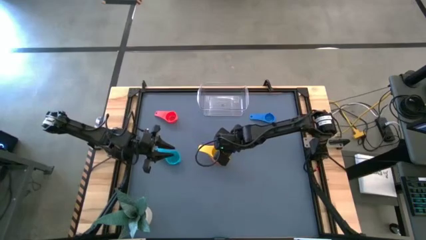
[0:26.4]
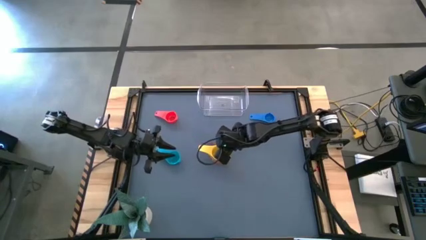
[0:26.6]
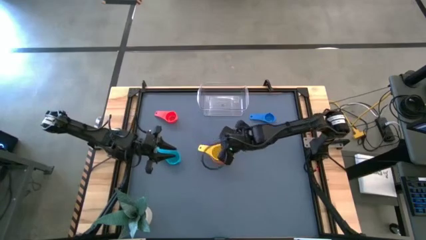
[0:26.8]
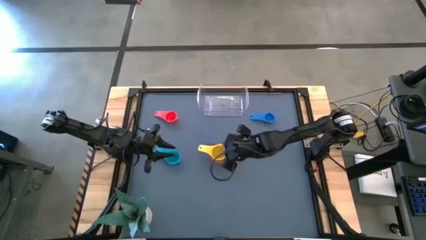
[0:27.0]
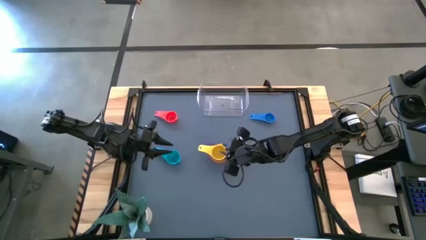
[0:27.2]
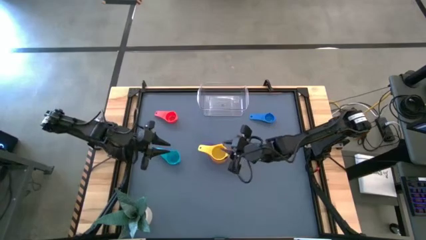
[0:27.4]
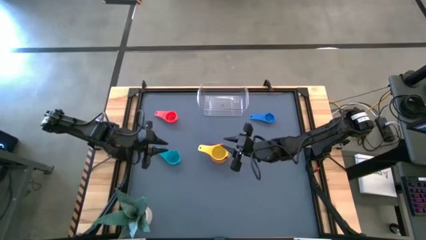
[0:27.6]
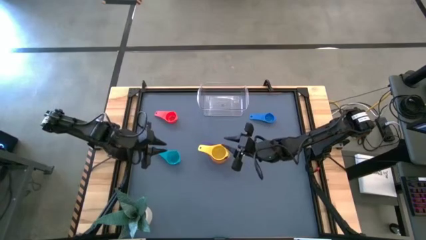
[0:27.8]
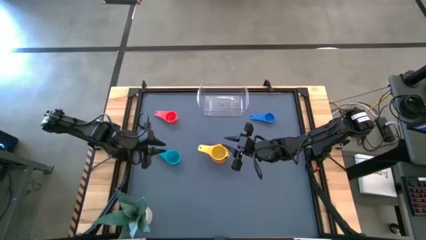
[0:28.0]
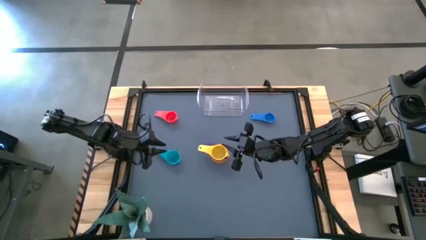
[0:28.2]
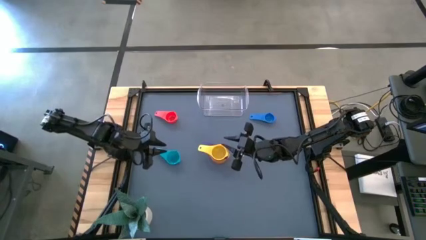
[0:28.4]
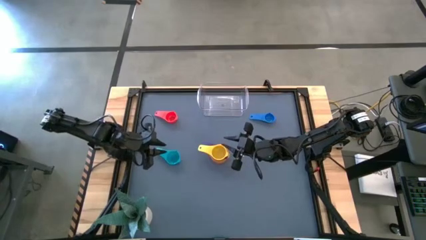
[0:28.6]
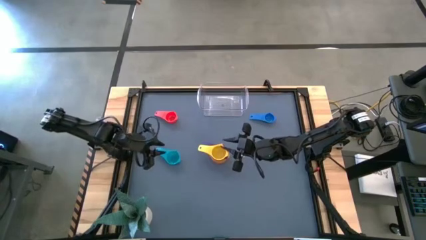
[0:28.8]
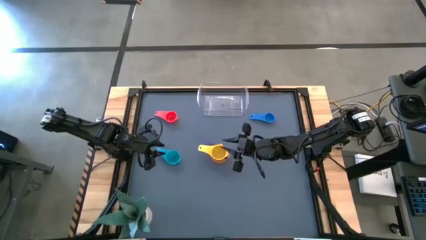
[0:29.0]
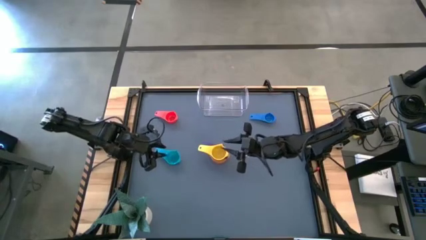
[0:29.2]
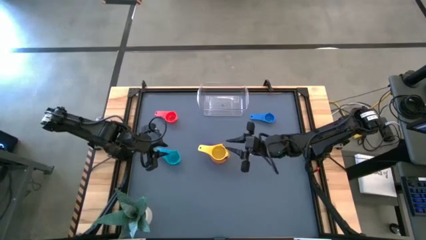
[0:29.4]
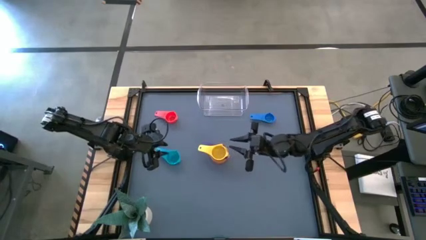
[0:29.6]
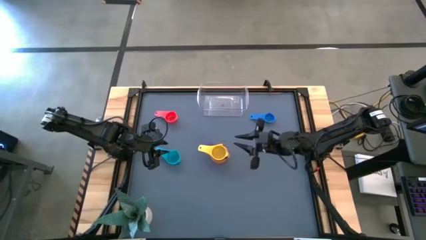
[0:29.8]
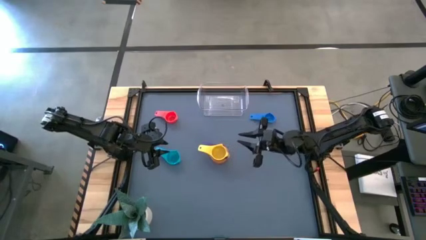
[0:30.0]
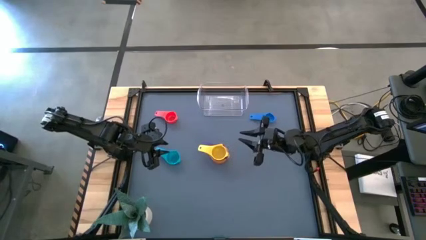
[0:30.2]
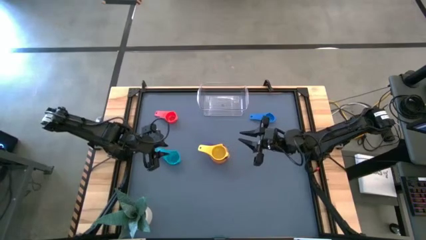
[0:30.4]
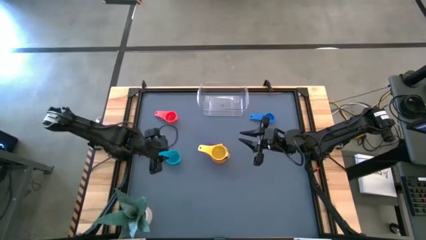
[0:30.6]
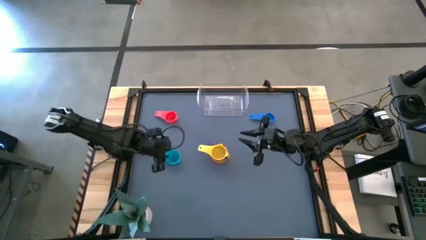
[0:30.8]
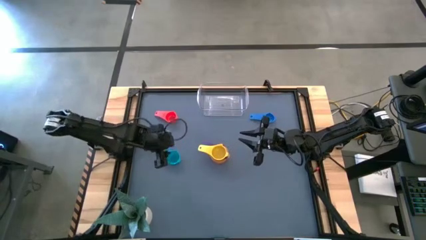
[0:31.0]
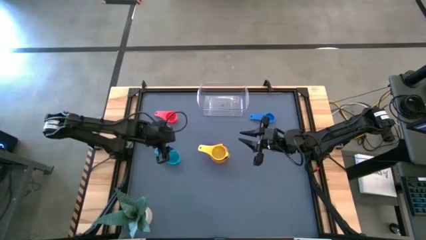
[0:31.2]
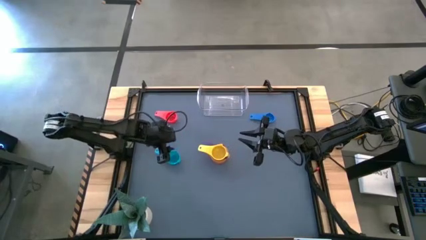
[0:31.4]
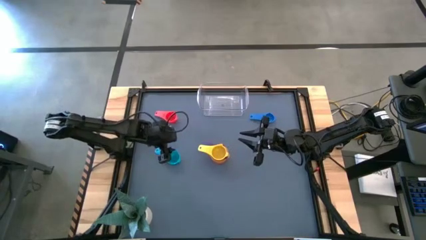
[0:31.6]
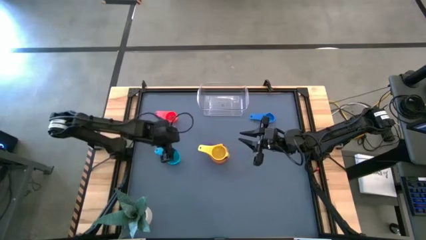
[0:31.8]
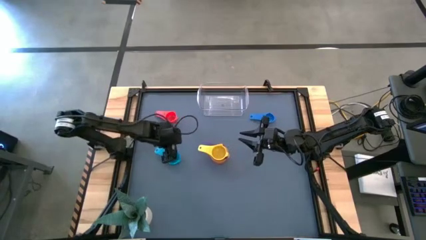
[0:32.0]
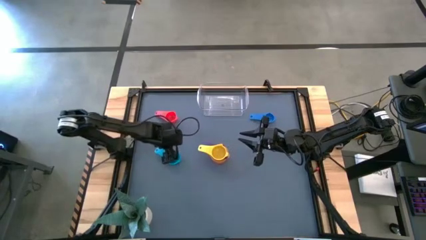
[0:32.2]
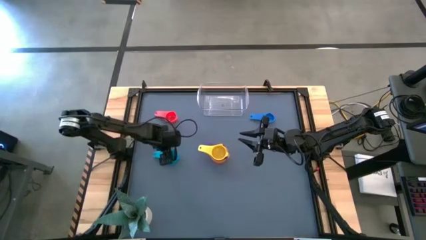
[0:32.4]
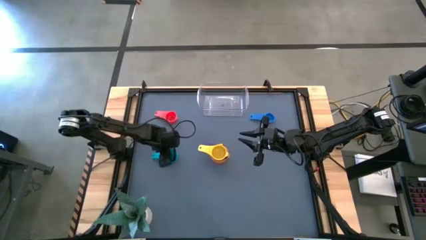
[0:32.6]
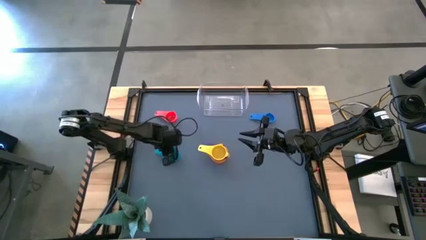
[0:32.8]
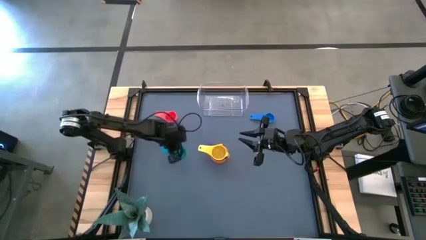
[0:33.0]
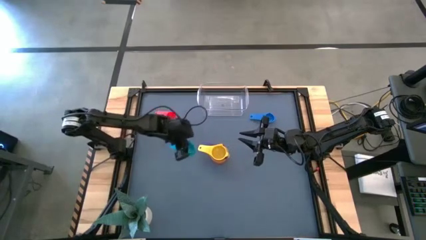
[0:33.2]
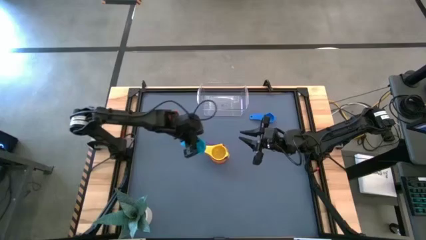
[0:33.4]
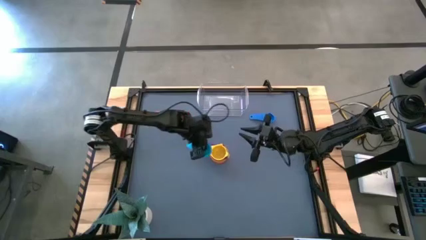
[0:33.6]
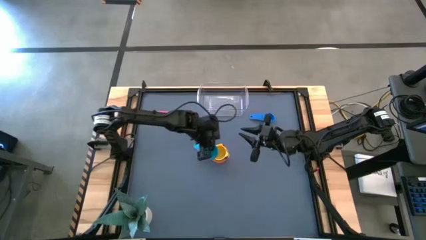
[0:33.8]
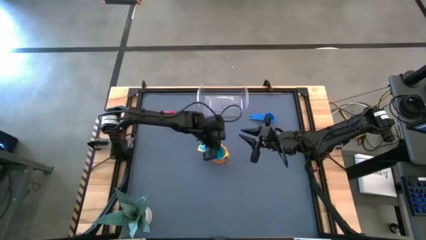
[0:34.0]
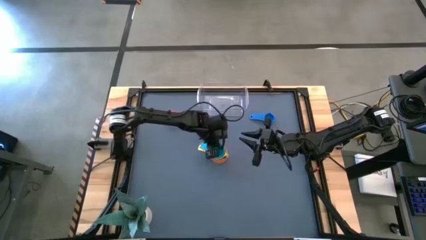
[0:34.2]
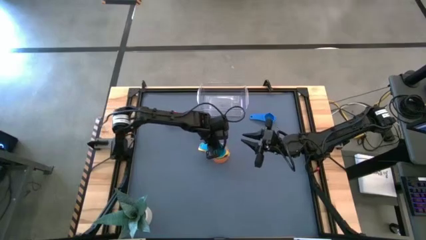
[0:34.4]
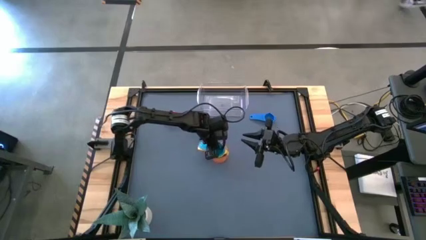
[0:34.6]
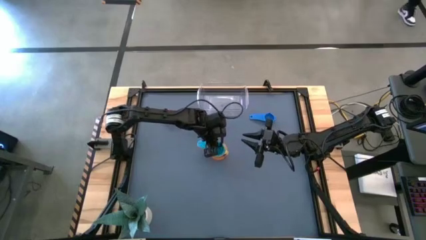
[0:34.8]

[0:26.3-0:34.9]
Task: Nest measuring cups in basket
Stack the light blue measuring cup on top of the yellow measuring cup

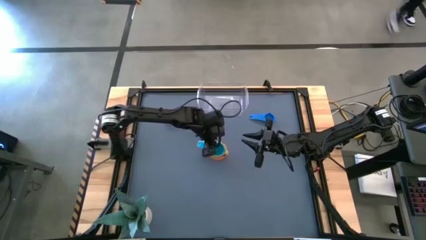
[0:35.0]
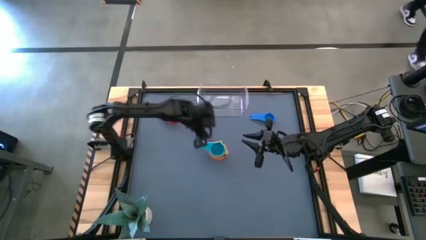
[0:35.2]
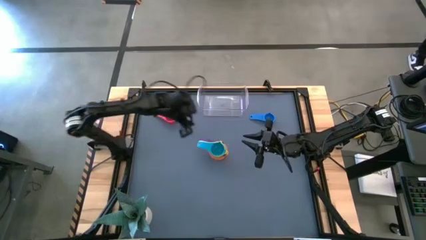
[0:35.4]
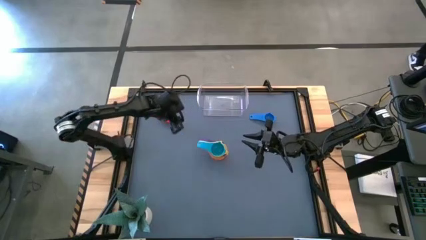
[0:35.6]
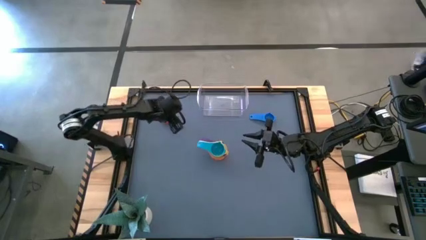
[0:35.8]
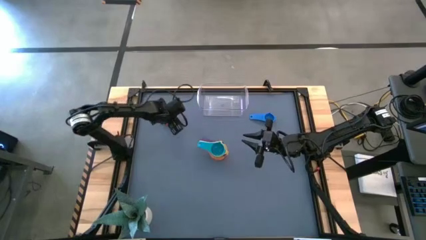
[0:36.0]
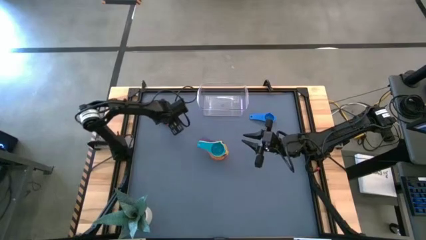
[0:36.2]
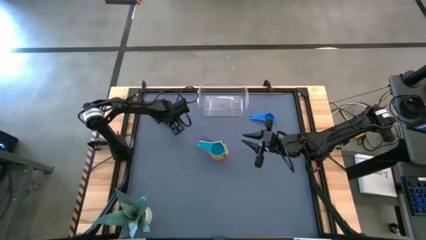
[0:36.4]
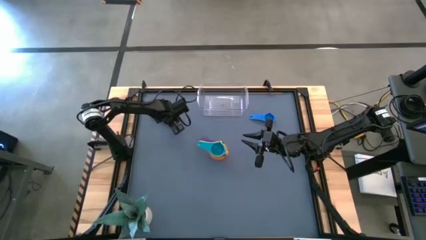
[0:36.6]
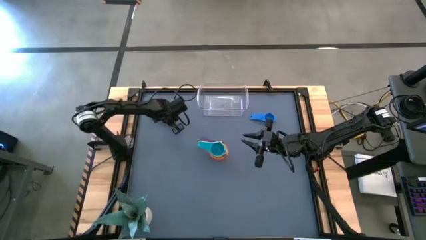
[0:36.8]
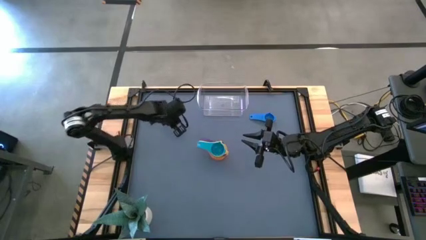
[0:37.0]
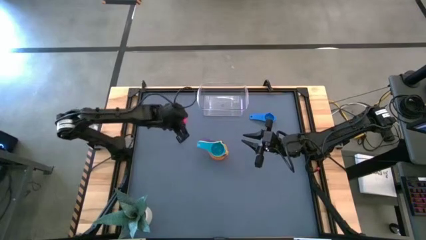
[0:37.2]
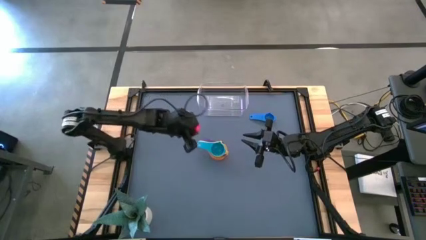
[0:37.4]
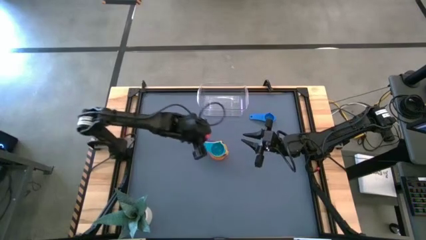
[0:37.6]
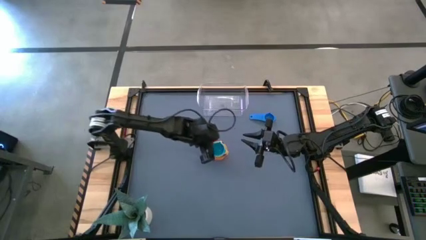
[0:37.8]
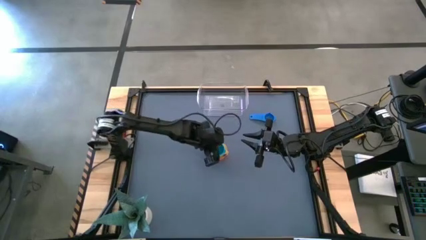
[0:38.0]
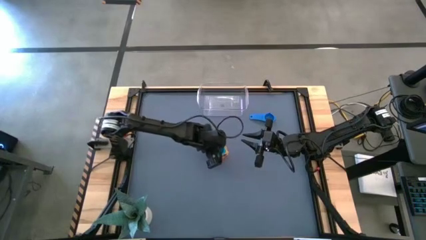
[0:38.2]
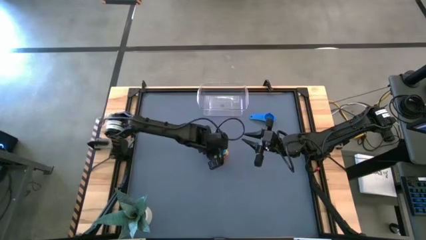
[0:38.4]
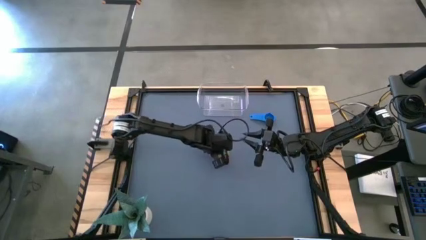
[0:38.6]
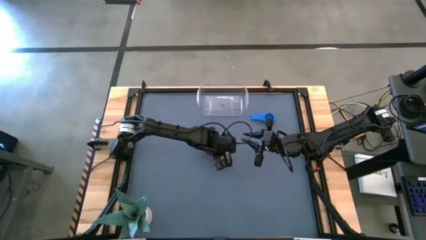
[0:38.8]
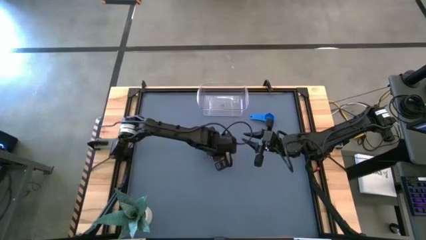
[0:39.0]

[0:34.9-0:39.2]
Stack the red measuring cup on top of the light blue measuring cup

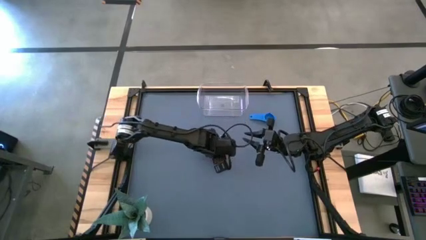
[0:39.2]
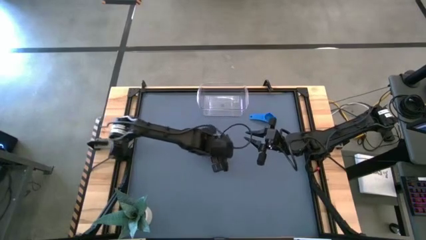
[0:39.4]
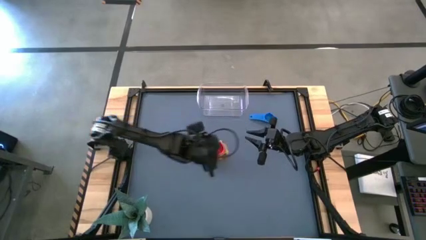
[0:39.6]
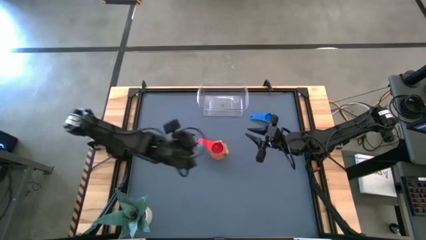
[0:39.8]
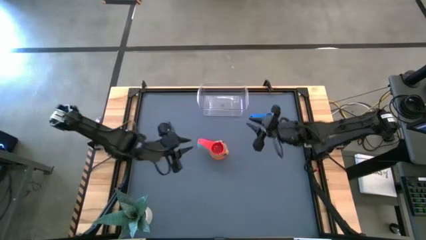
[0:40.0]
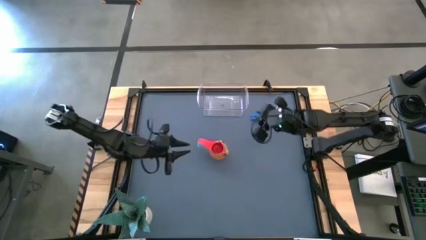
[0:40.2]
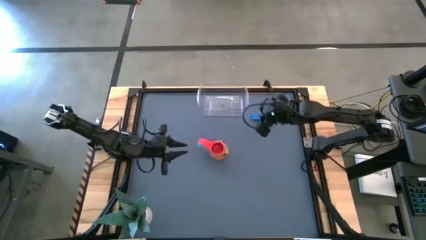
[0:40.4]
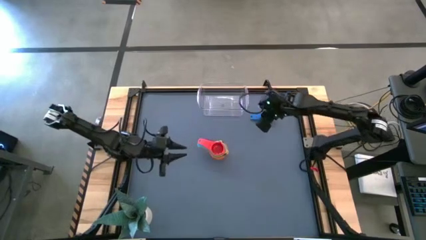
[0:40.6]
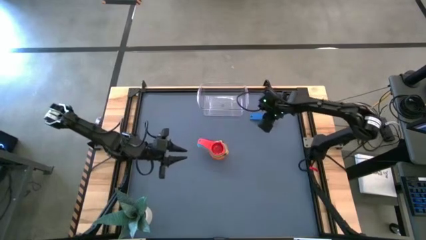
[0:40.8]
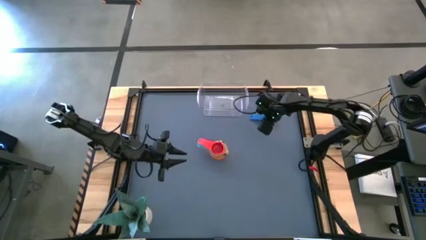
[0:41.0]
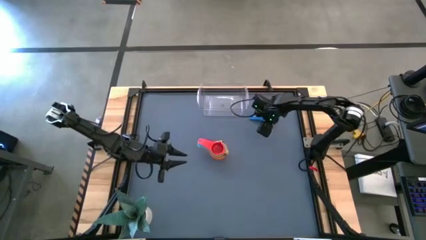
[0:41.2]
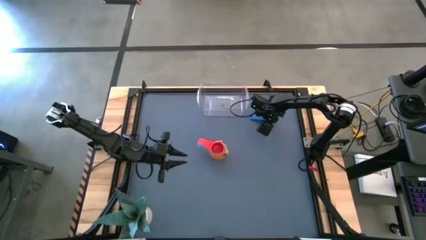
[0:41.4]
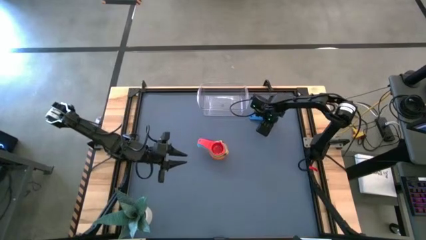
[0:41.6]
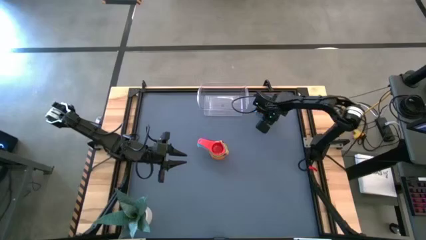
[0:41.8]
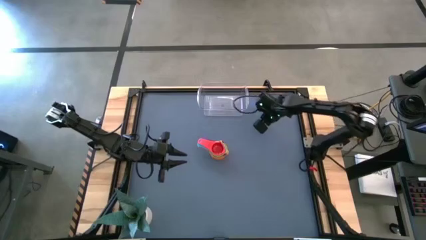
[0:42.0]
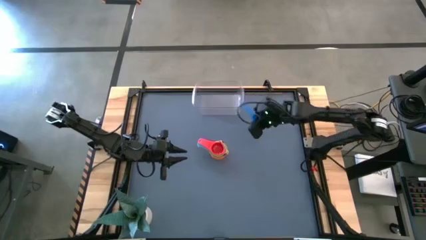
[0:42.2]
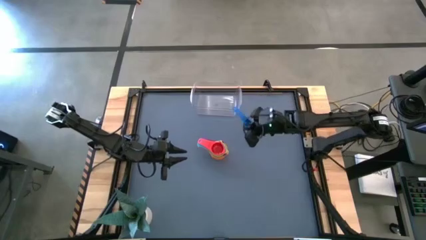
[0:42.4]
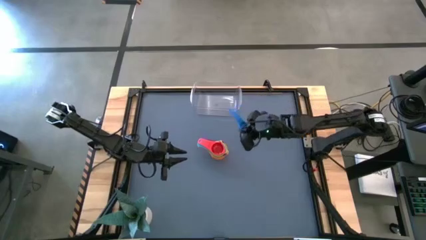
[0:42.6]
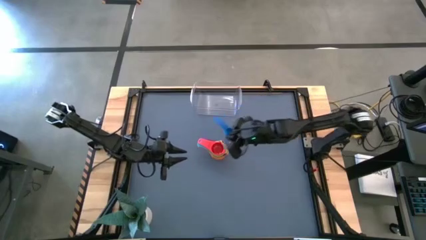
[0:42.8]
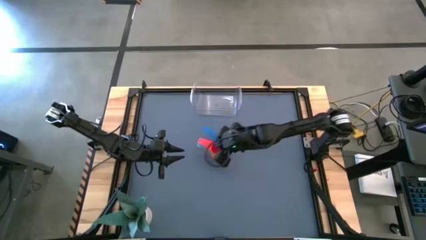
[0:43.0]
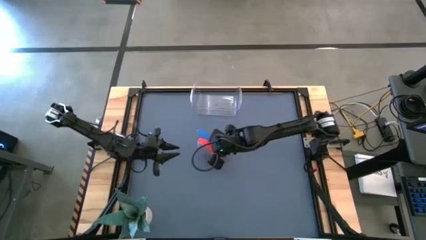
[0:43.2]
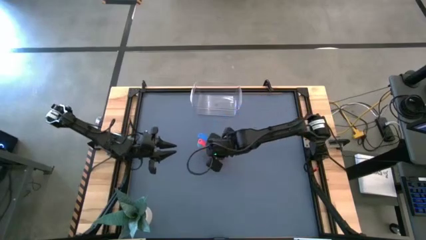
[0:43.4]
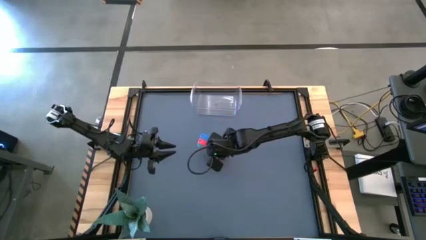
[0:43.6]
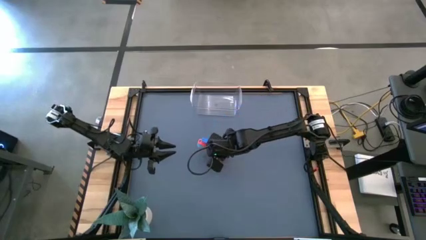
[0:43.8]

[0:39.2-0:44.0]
Stack the blue measuring cup on top of the red measuring cup
